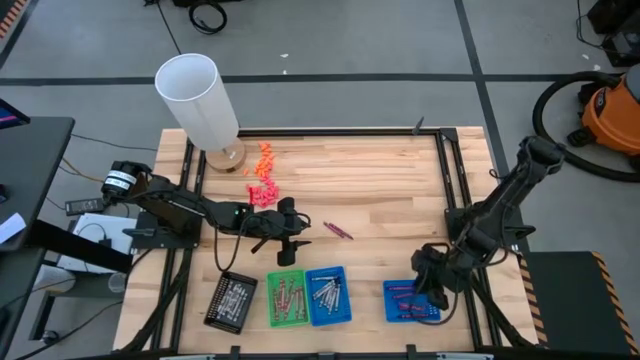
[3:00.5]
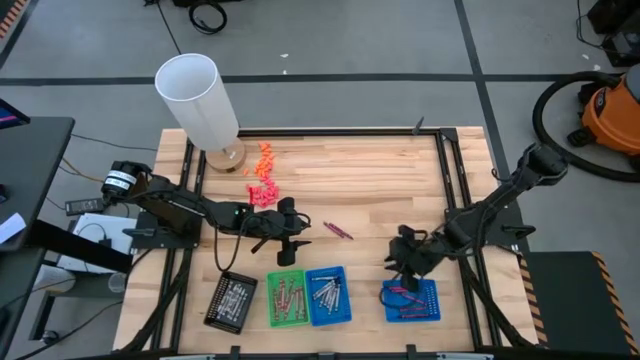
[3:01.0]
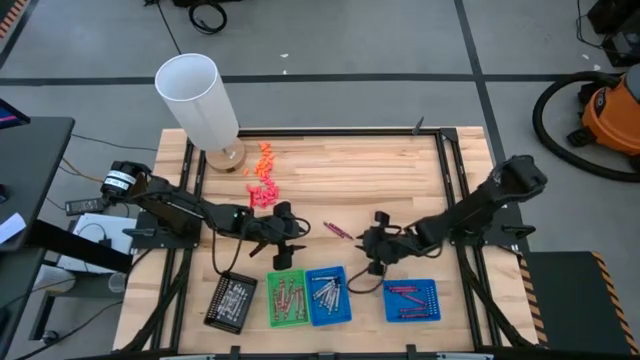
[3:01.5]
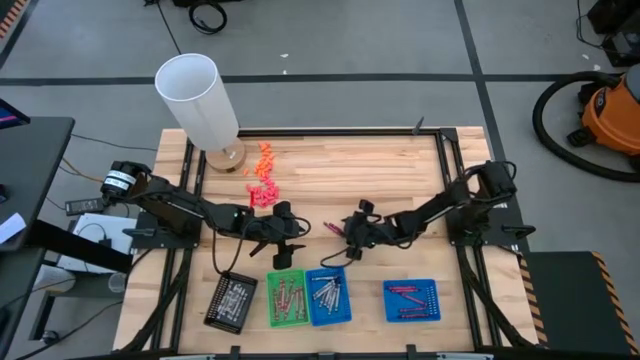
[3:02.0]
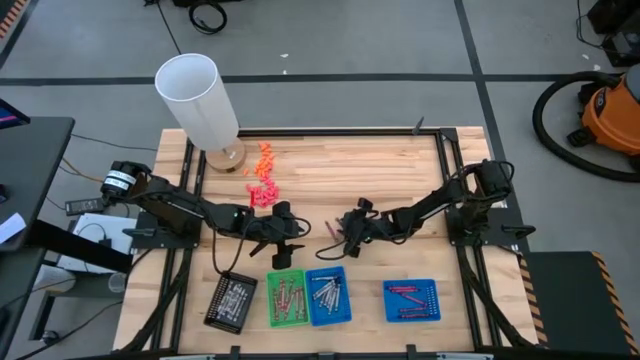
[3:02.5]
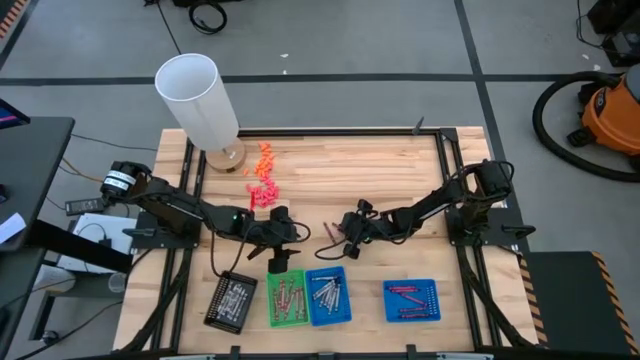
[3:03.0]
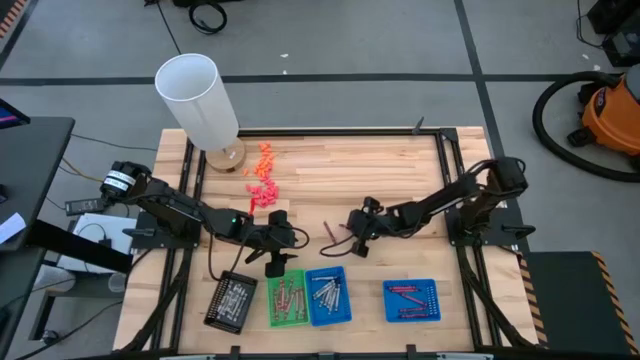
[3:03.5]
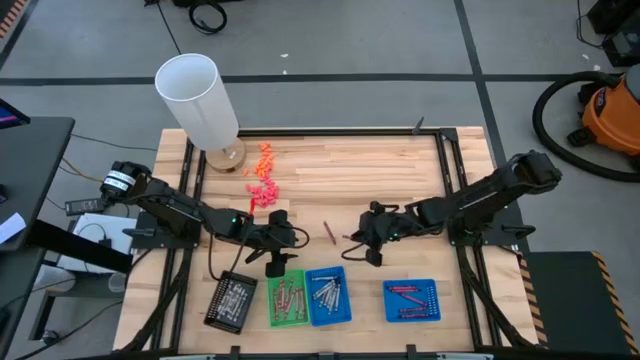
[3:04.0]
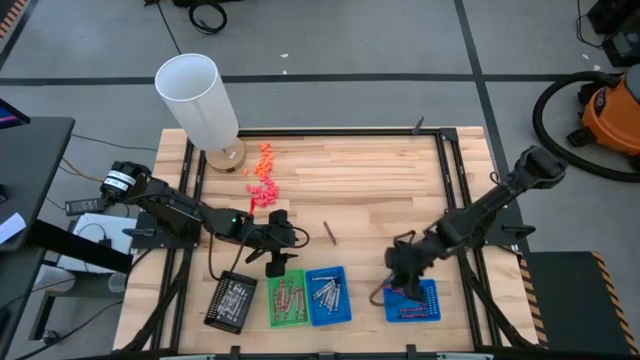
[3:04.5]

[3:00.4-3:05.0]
Task: Sort crayons
Put the red crayon into the right blue bin

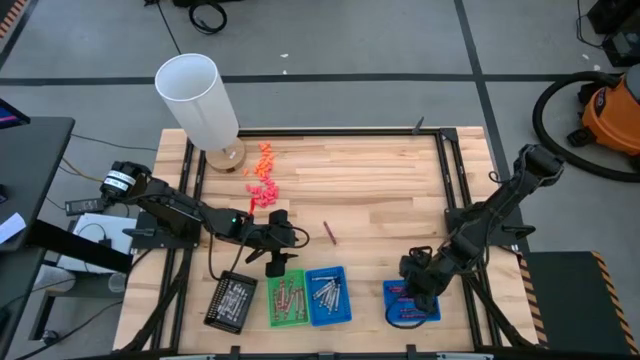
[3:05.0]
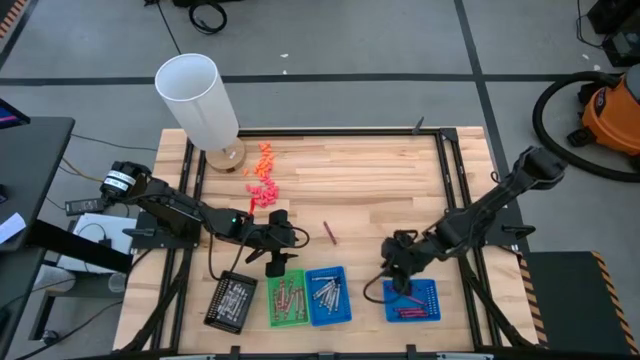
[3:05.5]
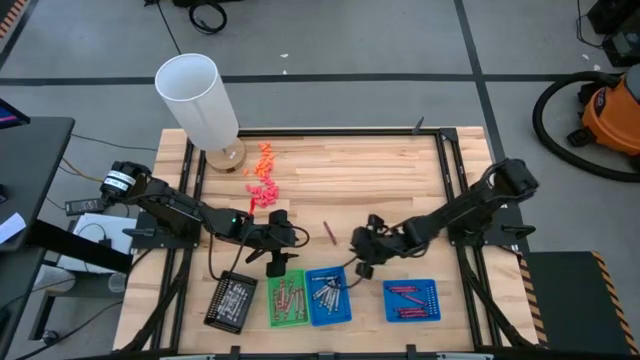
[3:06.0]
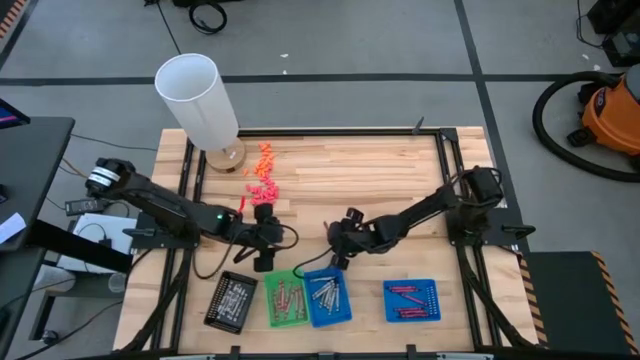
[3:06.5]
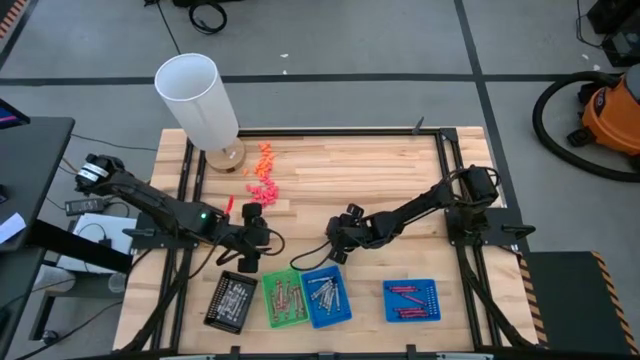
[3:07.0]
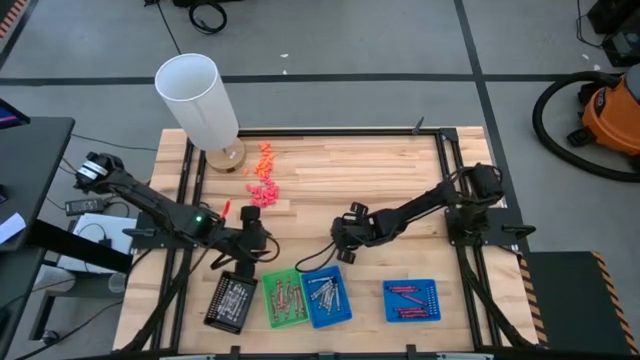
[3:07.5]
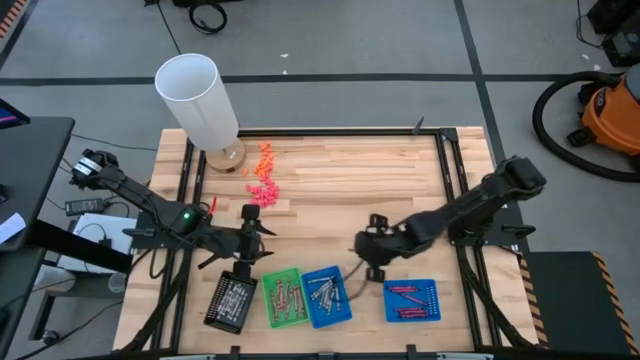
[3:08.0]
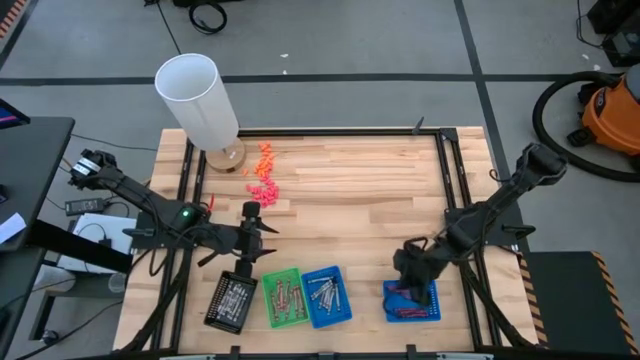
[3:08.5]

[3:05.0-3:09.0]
Put the red crayon into the right blue bin

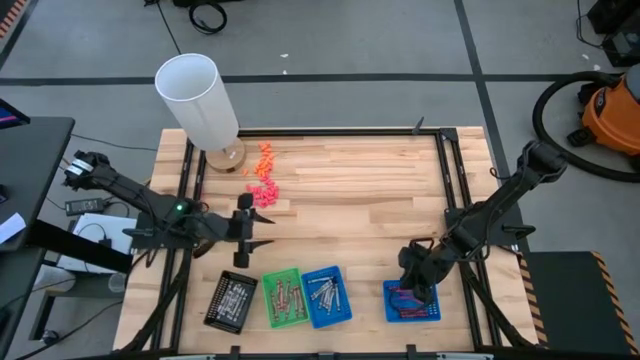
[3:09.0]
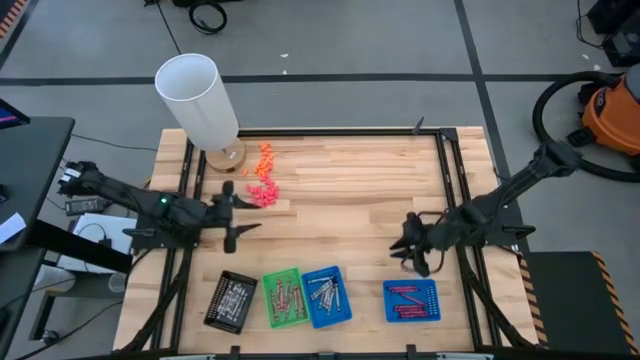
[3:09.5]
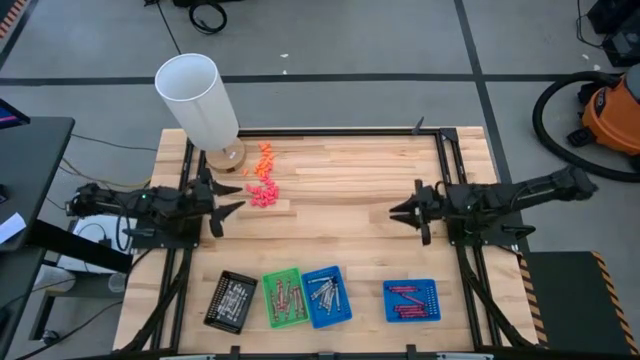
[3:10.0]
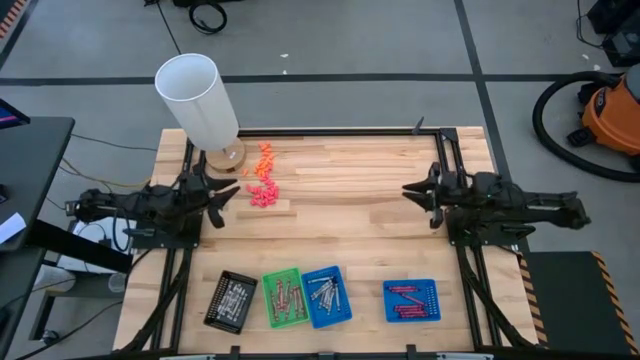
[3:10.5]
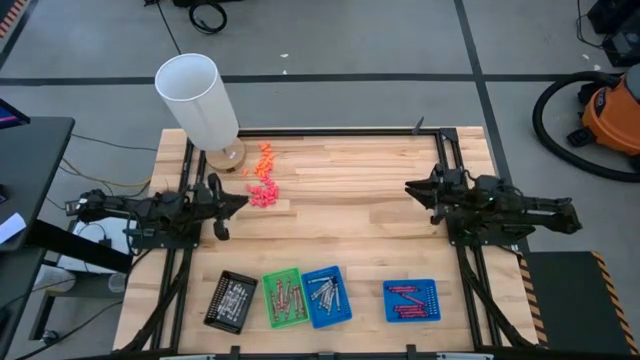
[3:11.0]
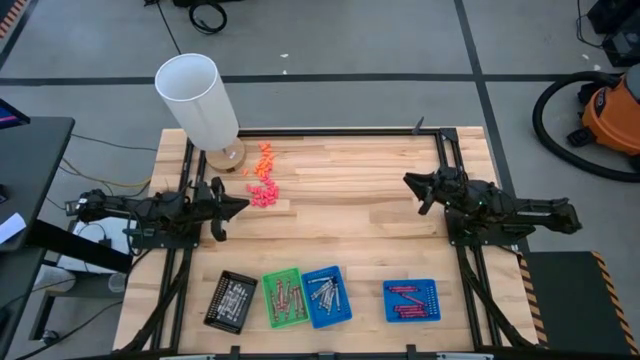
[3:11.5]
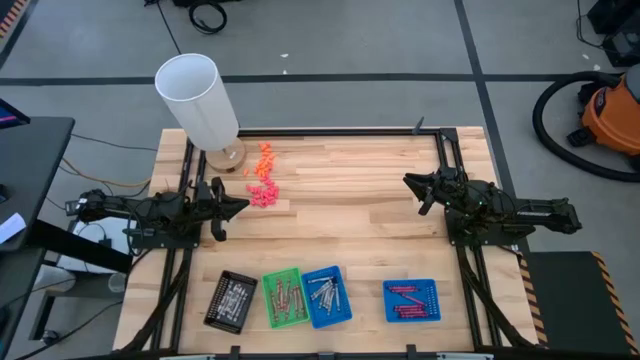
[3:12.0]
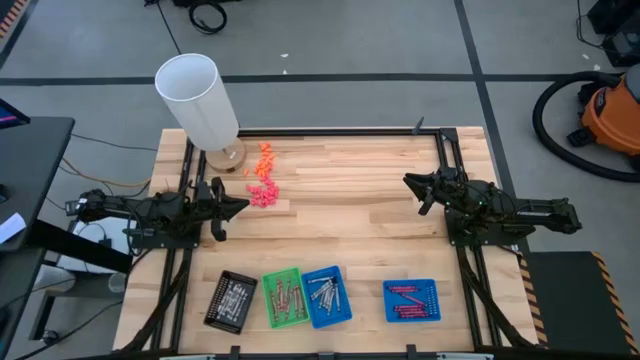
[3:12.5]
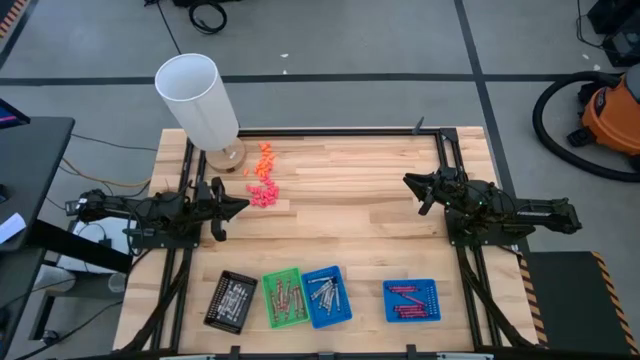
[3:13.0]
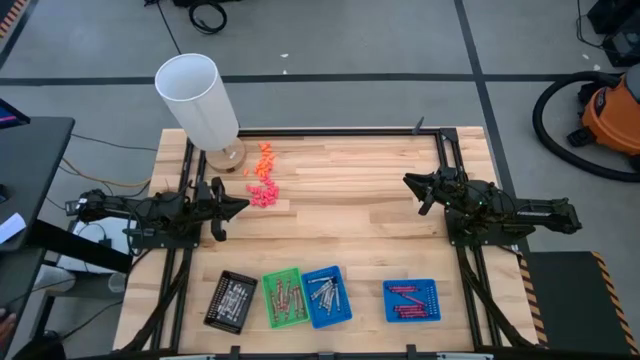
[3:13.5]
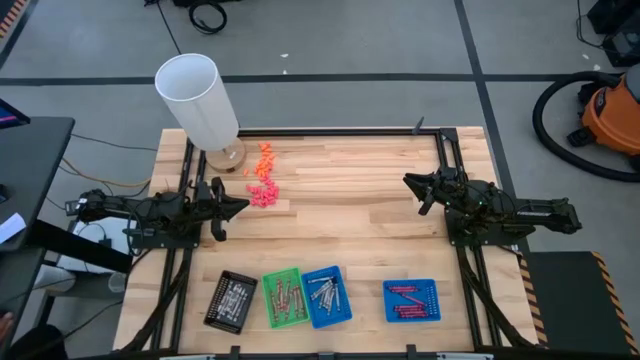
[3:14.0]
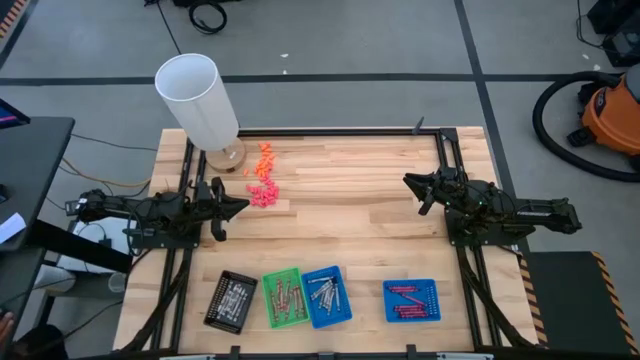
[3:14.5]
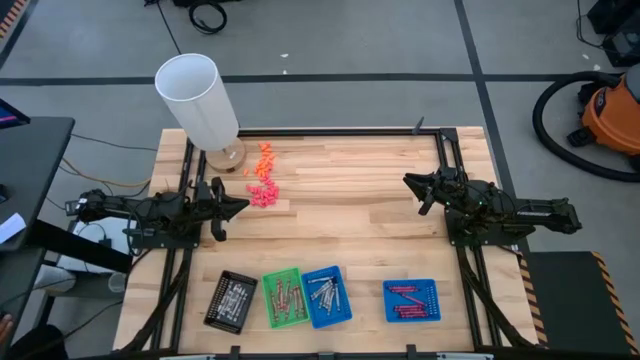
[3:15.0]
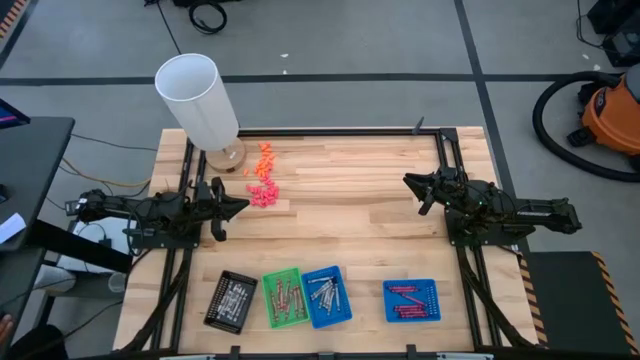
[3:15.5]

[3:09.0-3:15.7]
Return to Home Position

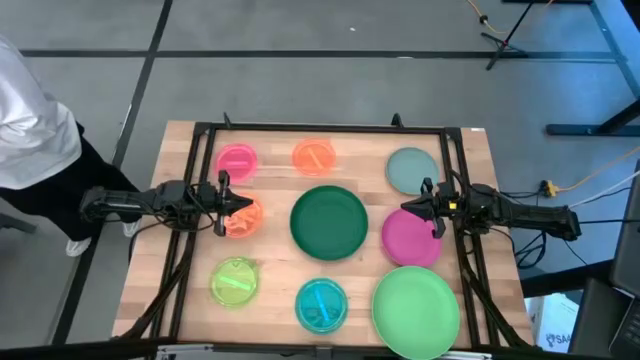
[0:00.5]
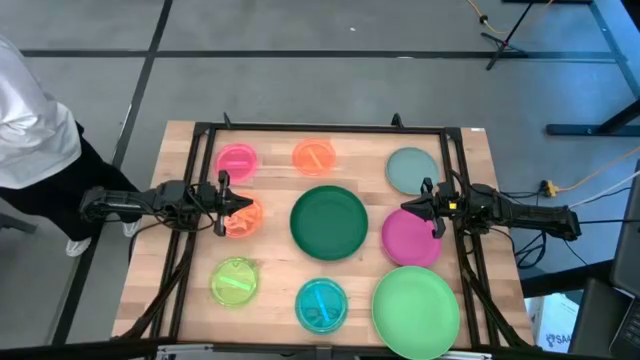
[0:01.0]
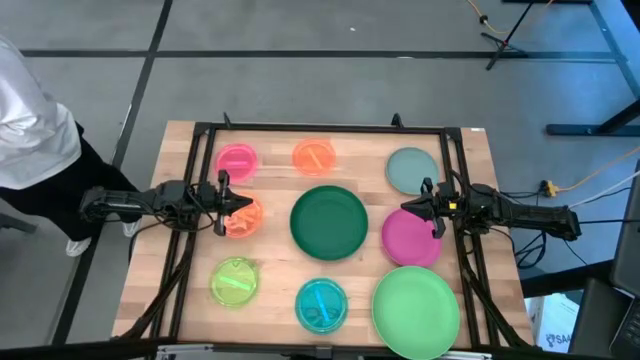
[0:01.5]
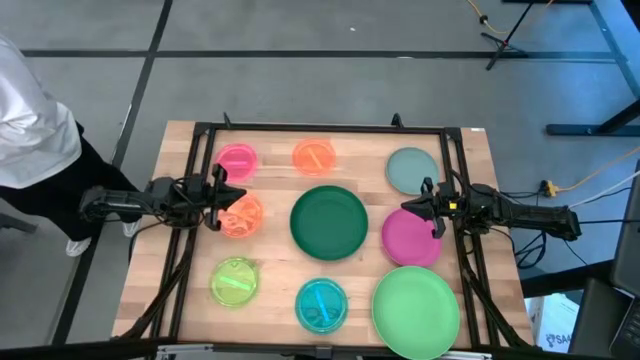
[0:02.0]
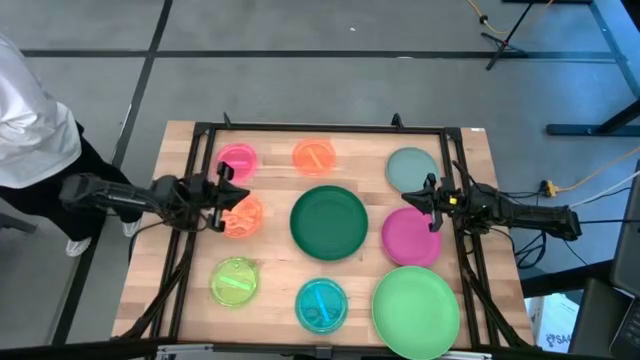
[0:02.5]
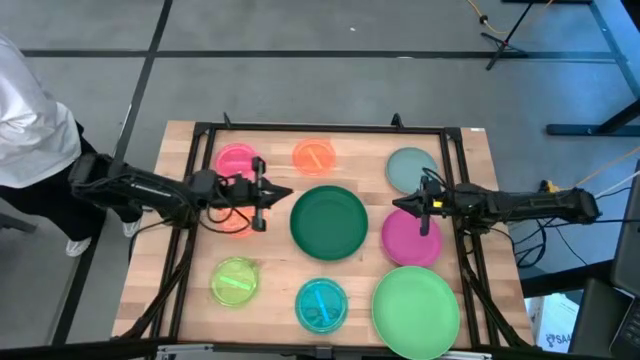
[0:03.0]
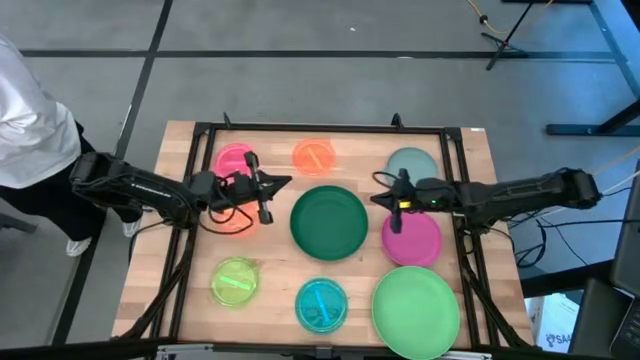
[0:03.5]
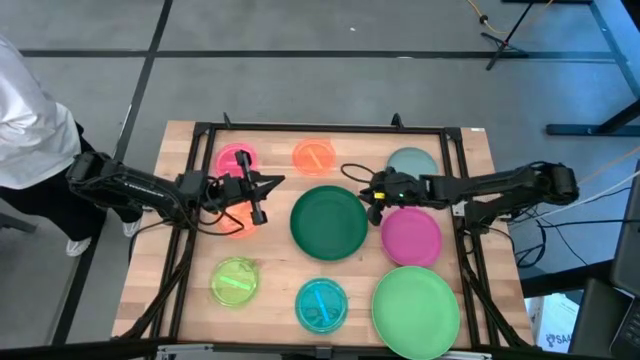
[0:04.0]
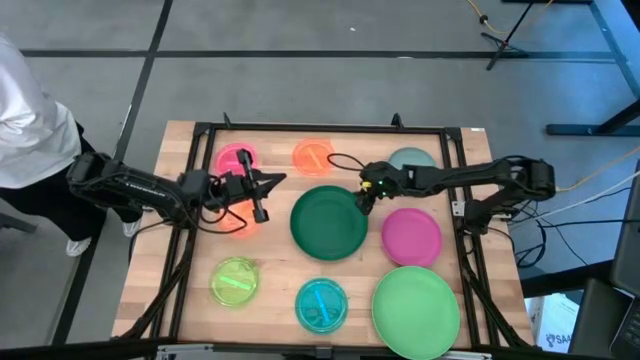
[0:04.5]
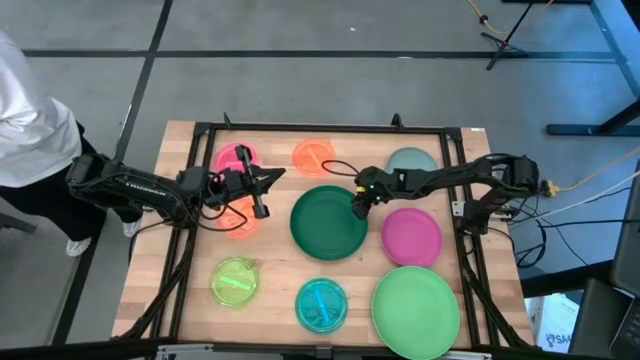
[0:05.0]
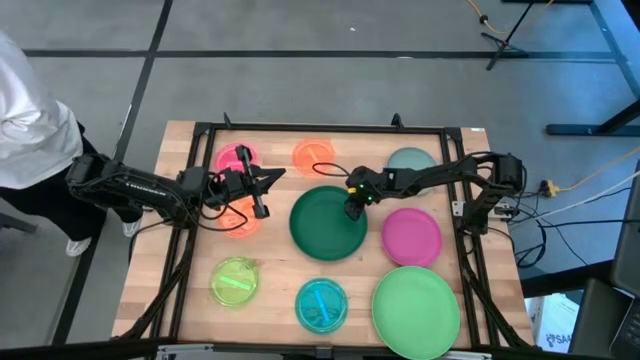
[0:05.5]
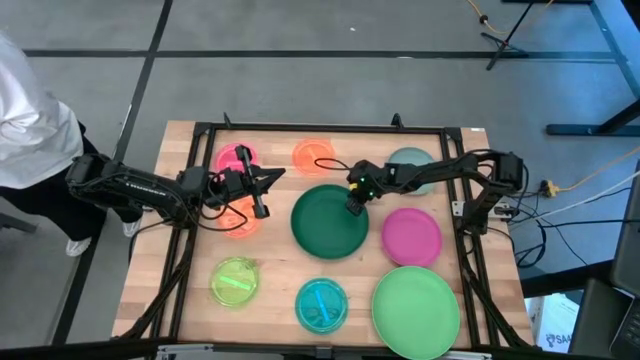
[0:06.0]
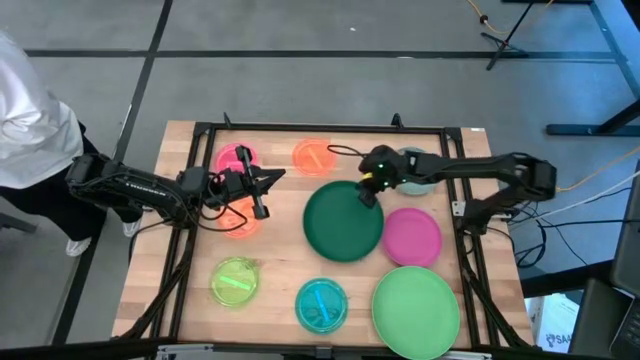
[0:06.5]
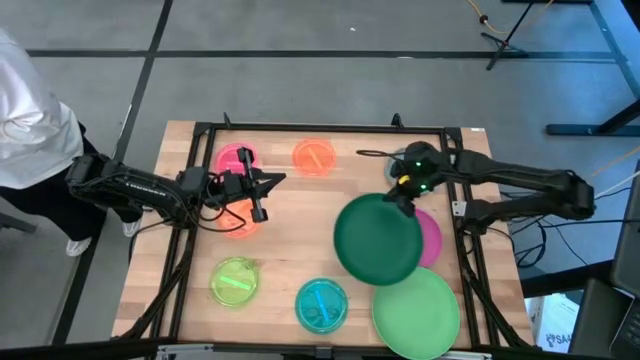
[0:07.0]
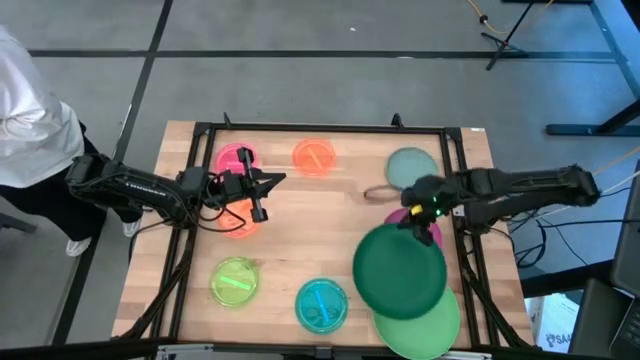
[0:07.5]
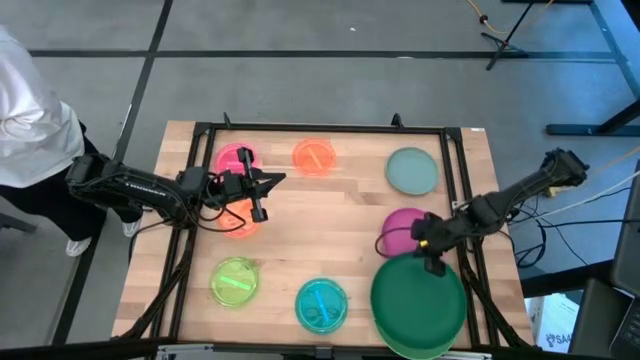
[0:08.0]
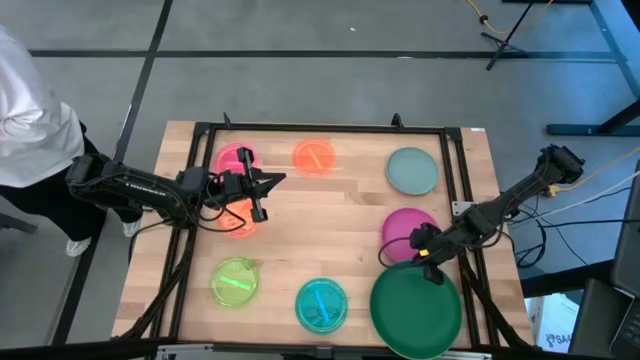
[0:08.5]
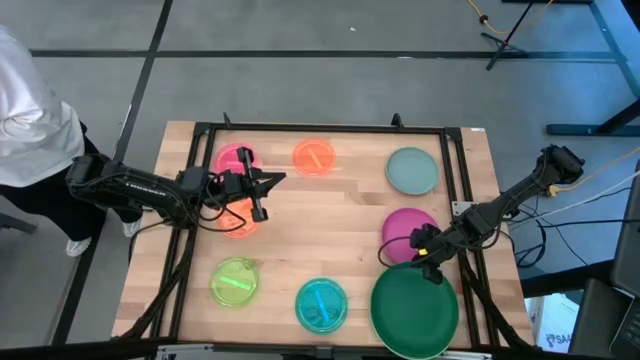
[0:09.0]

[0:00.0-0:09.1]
Task: Stack plastic plates
Stack the dark green plate on the green plate
